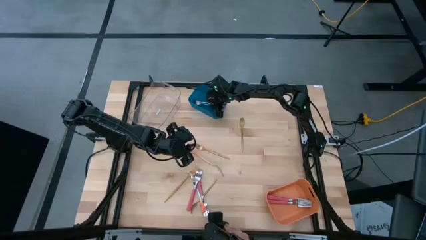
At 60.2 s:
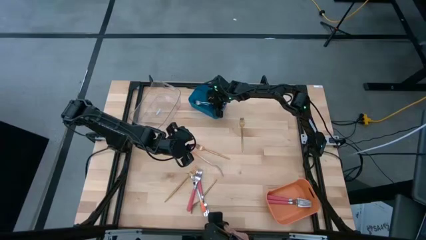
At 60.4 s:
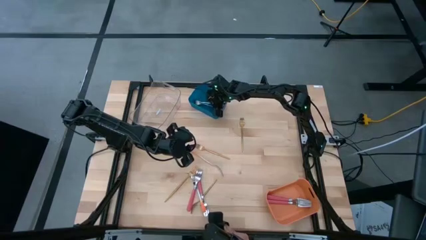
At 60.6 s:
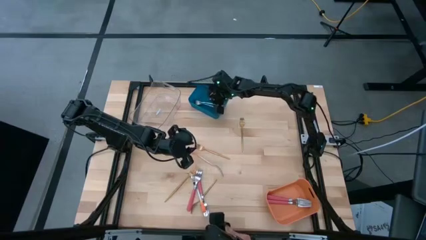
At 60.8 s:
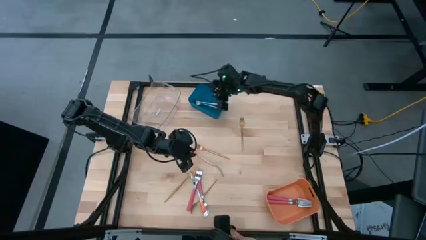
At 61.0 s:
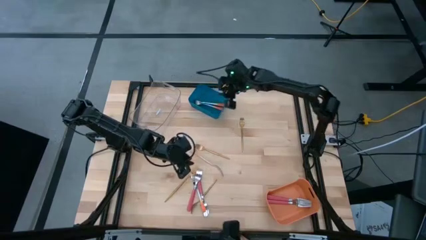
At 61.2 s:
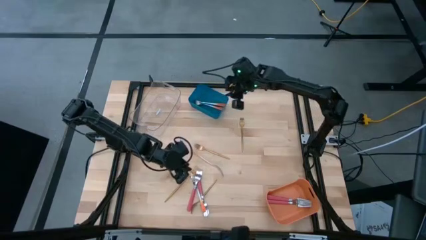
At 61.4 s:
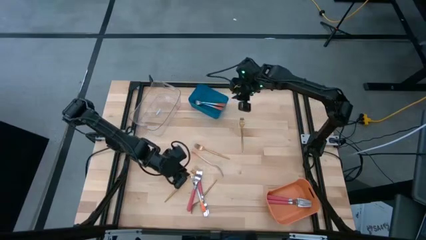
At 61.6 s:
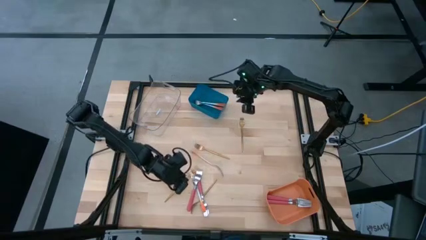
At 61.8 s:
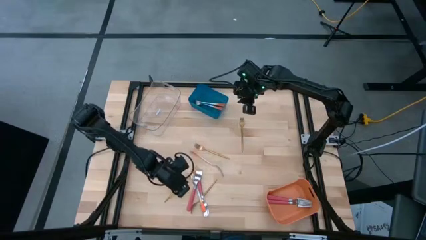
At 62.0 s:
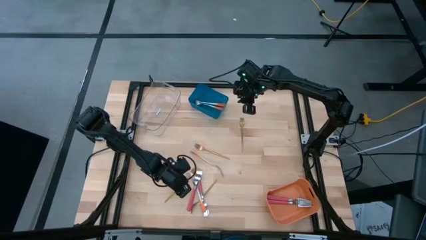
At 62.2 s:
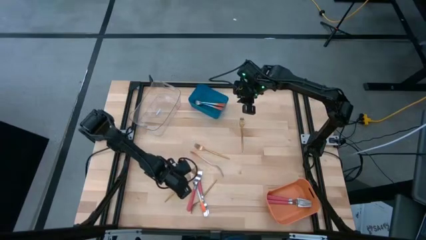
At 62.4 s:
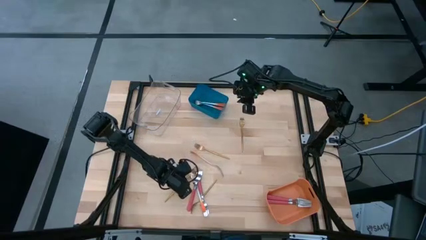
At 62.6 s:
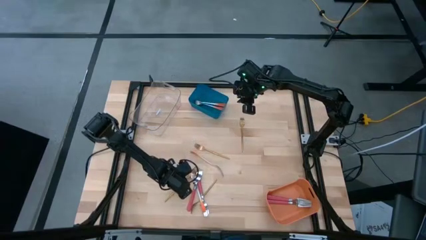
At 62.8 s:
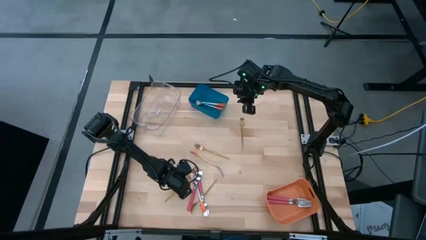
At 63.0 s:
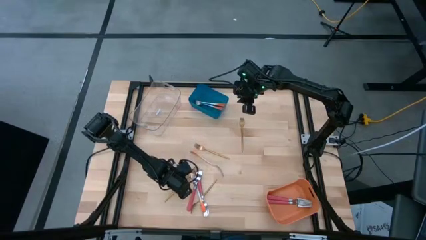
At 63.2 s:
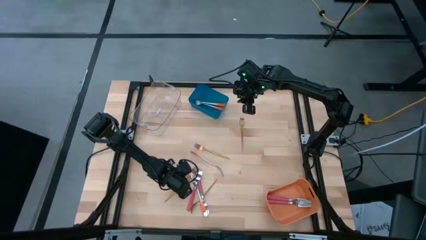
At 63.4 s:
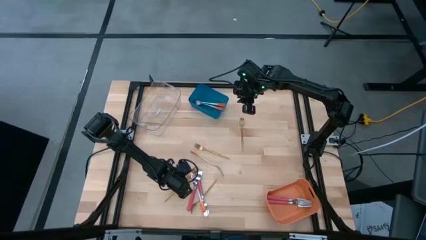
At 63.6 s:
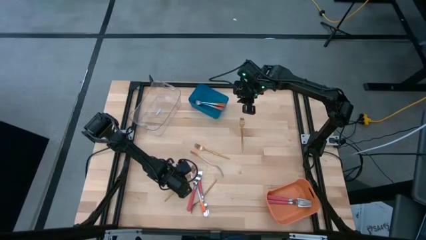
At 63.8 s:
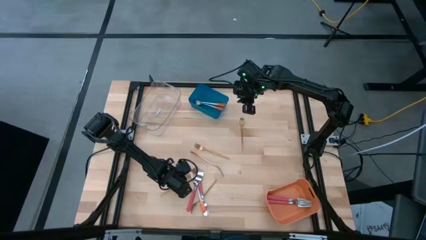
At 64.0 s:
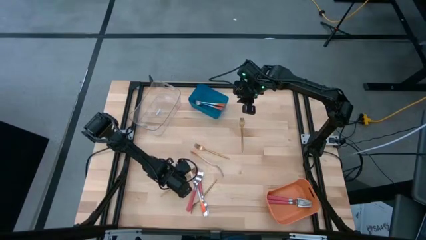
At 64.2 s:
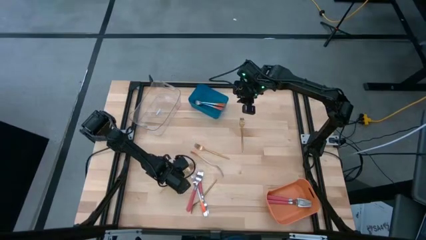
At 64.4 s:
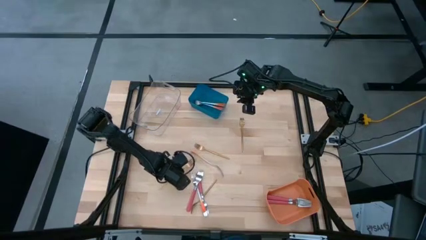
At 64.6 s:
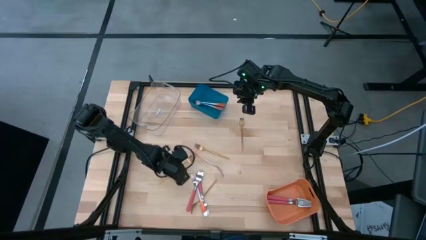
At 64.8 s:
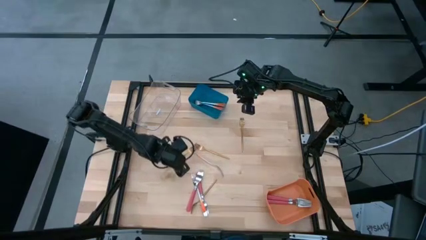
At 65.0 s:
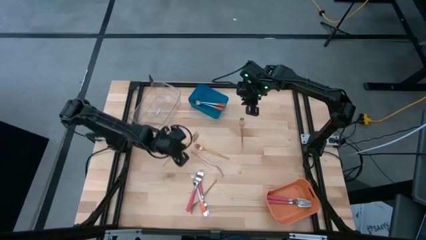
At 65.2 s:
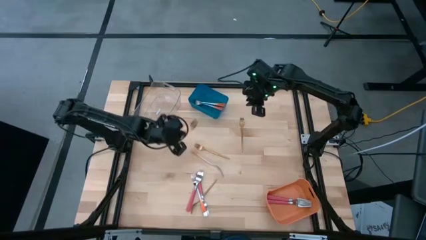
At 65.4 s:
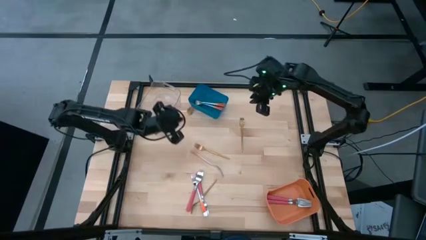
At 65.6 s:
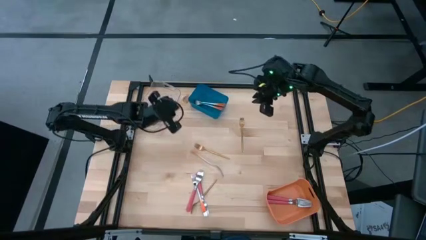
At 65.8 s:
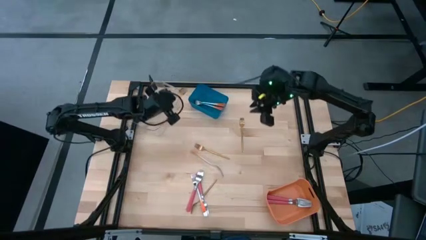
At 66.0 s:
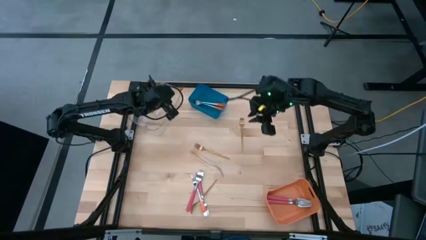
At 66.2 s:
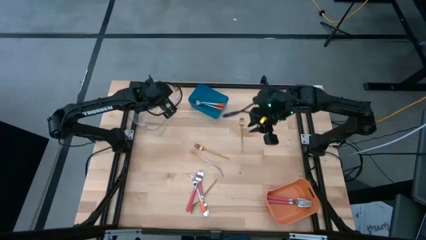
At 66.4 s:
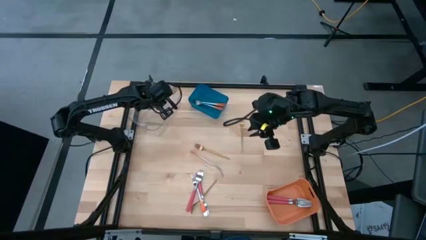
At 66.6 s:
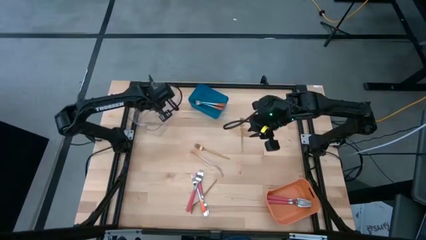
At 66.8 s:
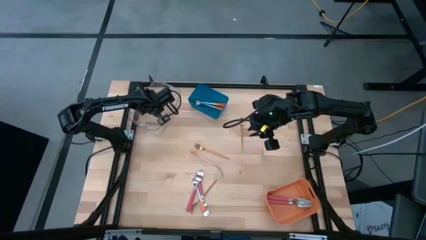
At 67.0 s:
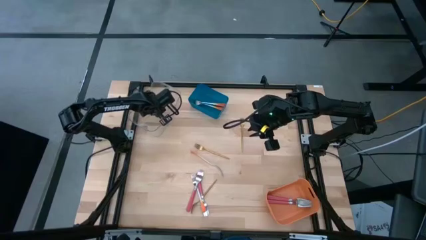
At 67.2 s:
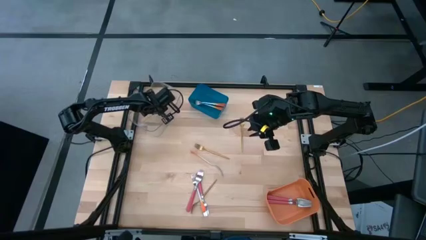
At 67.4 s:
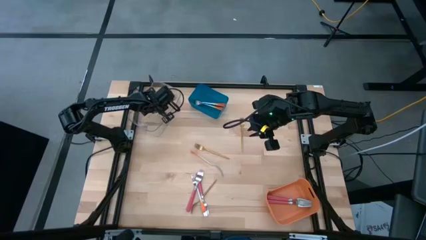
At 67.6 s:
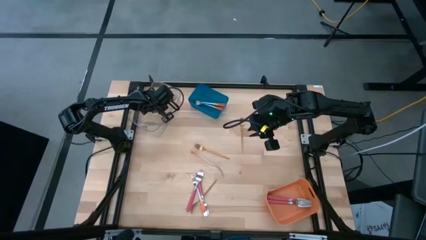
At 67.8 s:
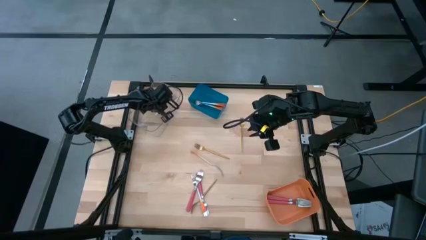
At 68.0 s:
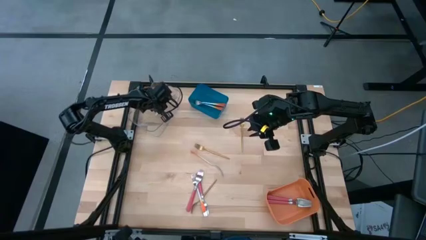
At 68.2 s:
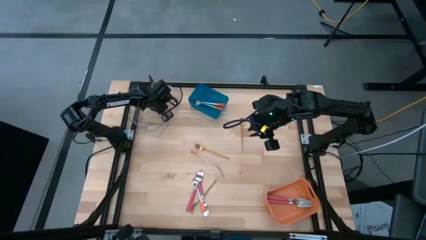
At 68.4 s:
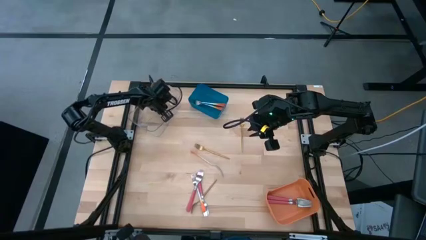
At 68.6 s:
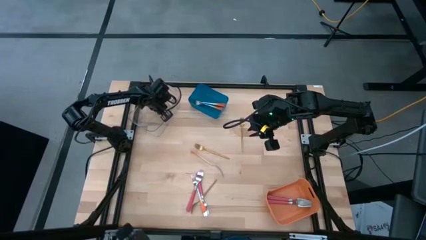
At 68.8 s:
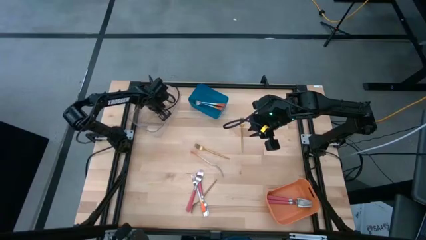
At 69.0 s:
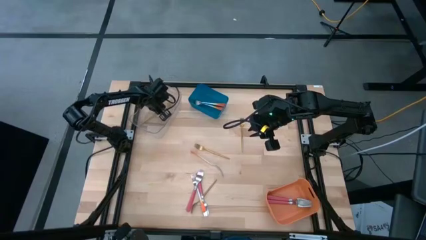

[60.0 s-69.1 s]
Task: Sort silverware by color (type)
Put the gold fork into the transparent bin

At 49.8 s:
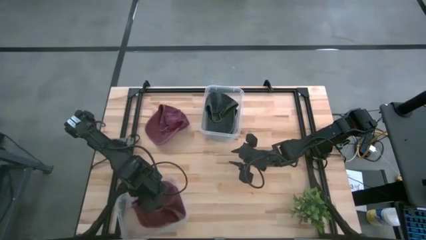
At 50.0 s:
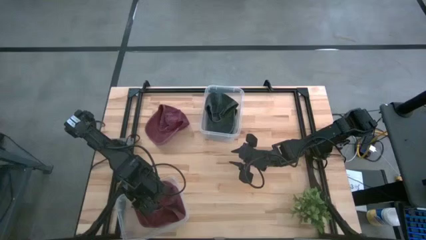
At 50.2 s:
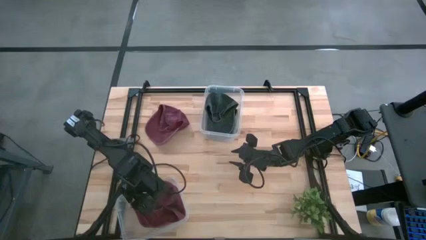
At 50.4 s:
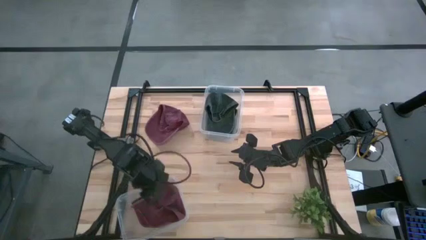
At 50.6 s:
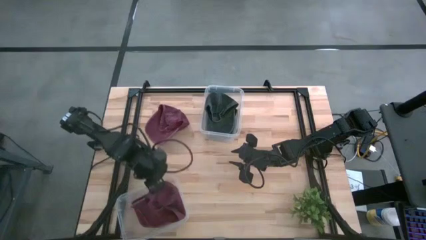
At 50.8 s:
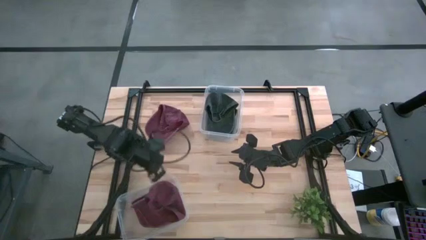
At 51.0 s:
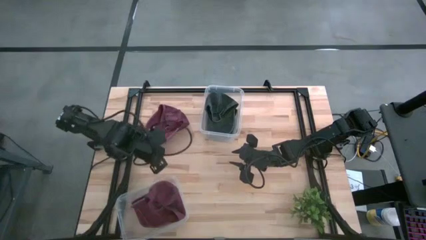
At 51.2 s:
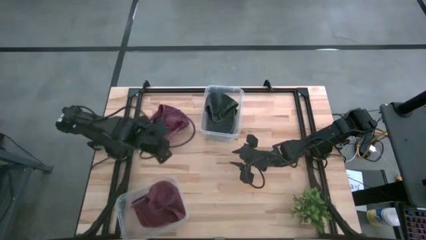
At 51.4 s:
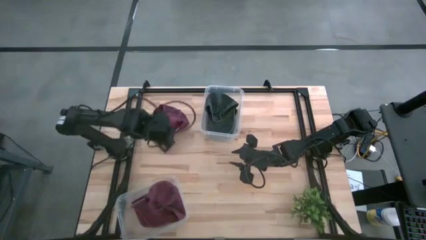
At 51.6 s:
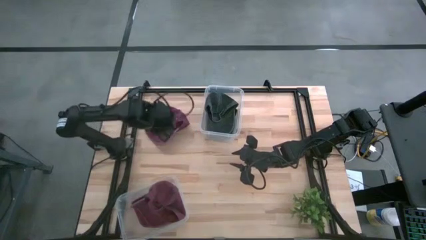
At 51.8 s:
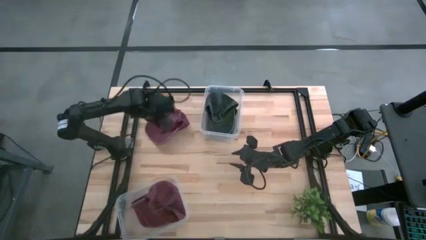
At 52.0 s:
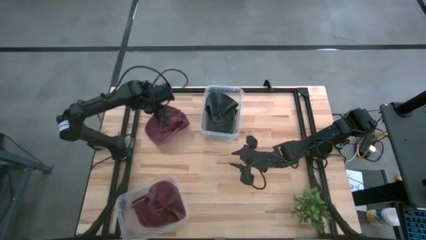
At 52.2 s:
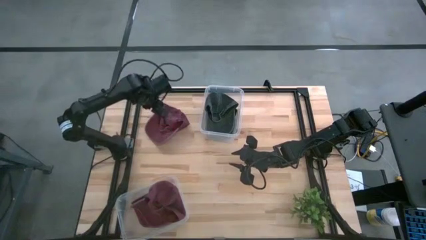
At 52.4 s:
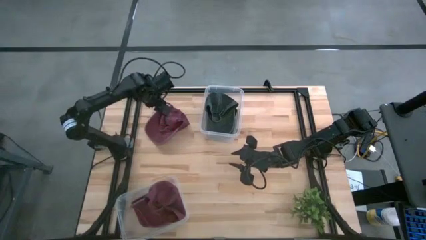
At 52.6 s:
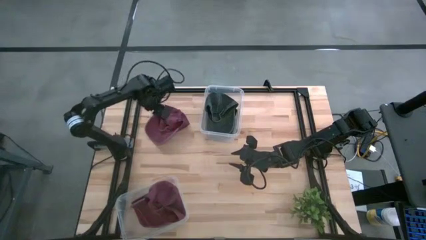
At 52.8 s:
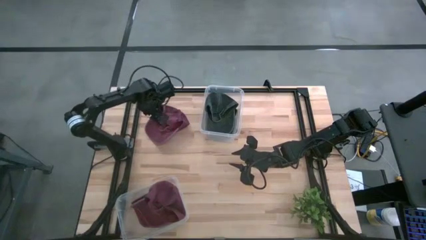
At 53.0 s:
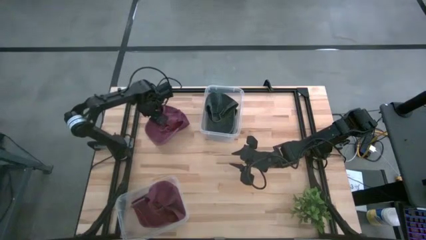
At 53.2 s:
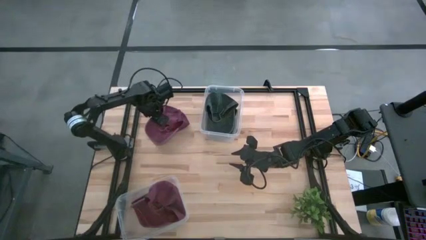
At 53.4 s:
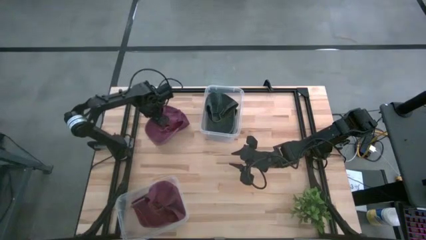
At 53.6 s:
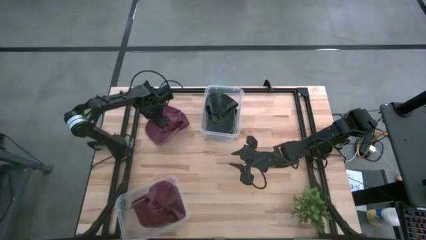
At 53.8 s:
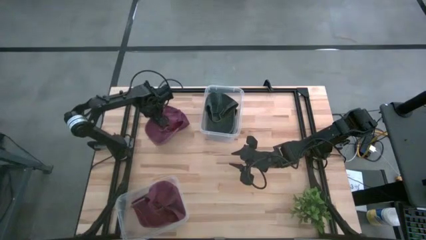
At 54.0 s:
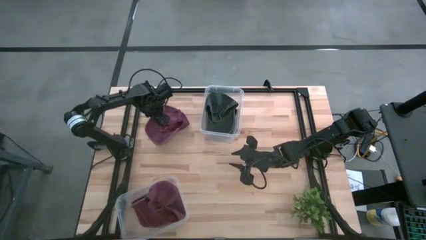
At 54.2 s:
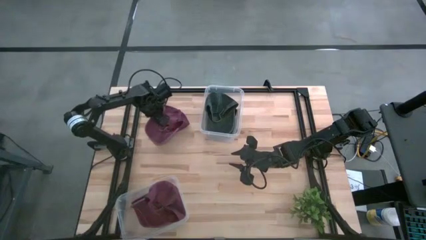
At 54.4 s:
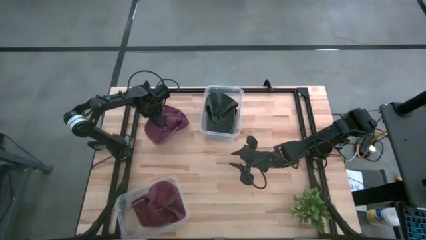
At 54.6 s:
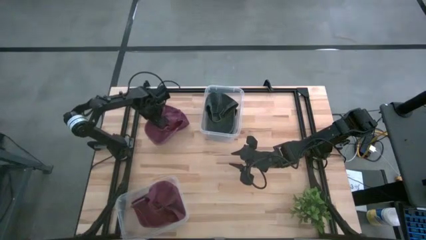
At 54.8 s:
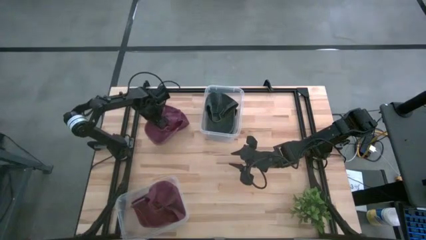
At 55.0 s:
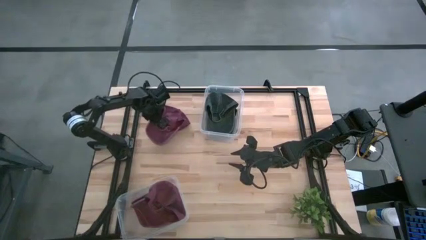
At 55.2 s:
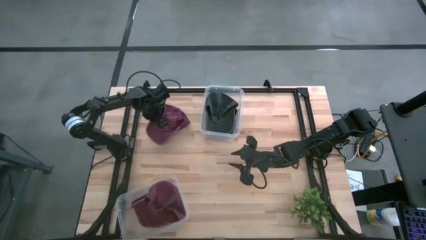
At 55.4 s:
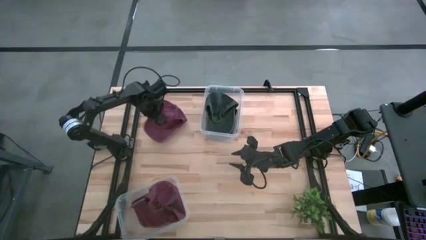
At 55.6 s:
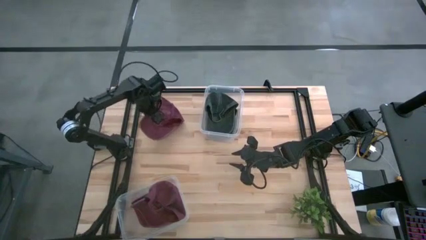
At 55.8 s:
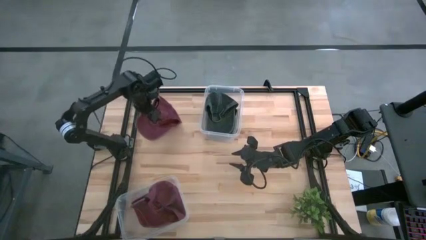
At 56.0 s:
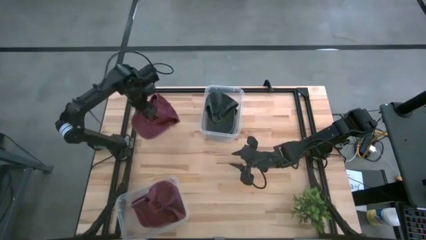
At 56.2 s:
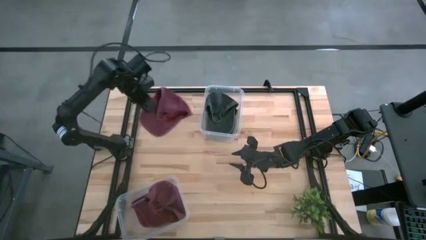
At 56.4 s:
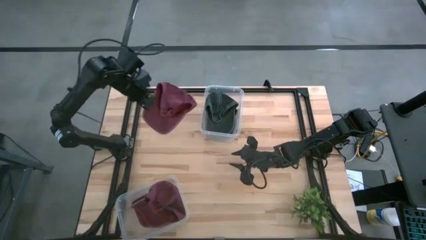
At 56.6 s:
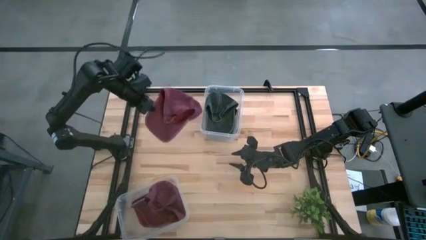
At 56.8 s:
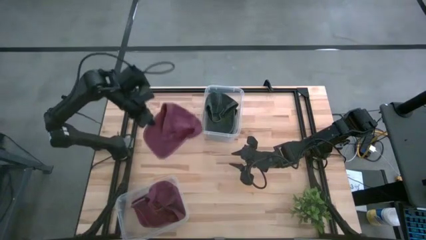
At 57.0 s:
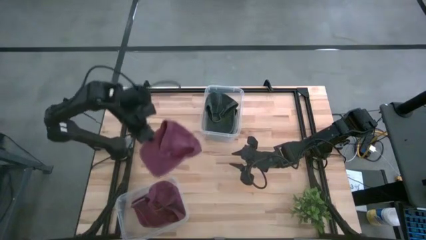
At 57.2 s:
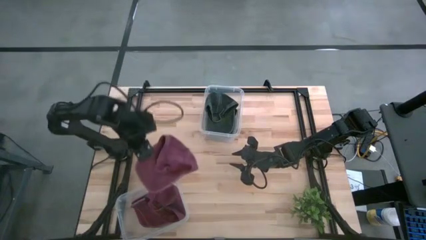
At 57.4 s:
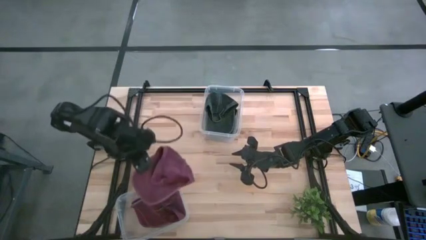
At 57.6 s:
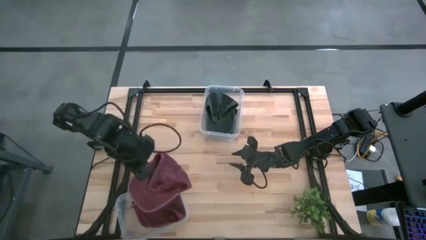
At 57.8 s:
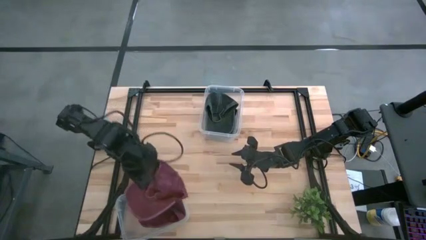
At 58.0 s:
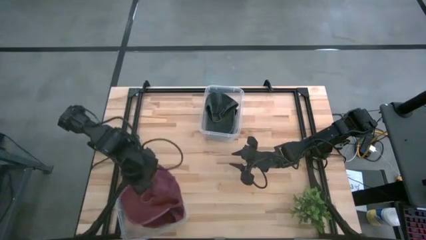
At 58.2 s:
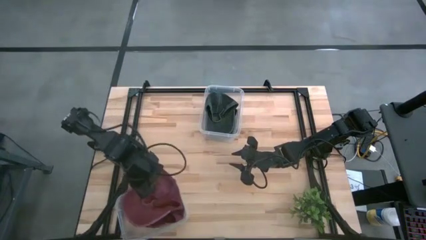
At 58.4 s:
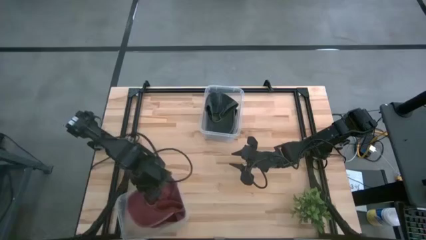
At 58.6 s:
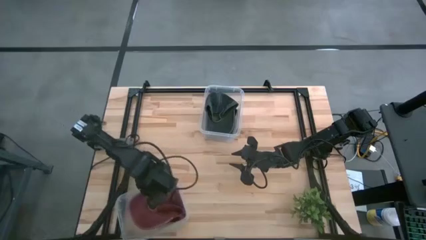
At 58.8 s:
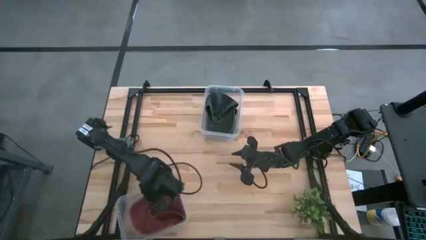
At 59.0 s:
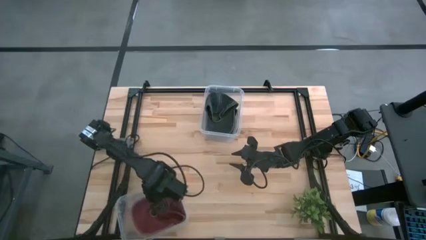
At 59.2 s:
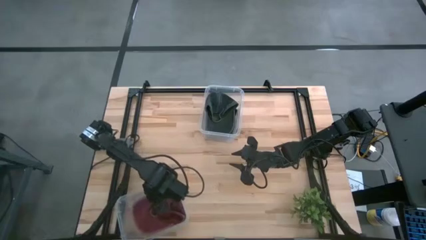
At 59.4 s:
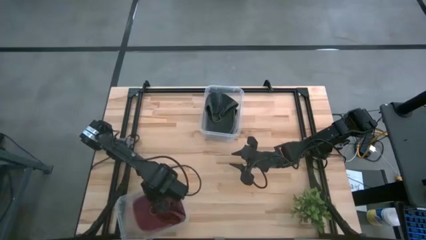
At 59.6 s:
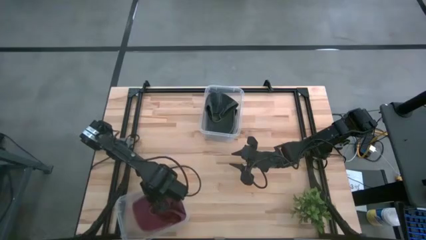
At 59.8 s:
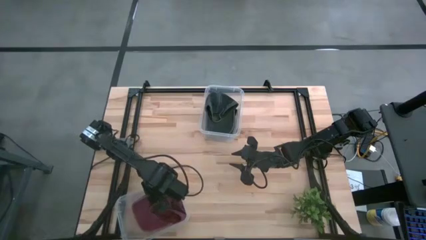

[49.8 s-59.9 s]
Task: Pick and place caps into container
Put the red cap into the bottom transparent container
